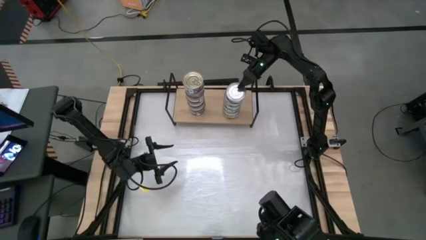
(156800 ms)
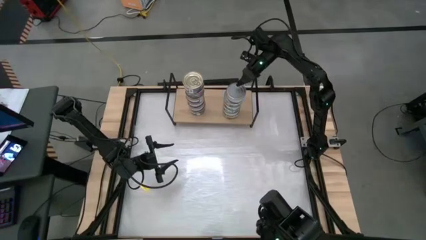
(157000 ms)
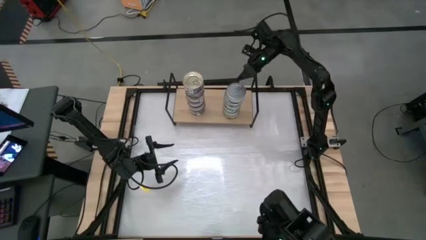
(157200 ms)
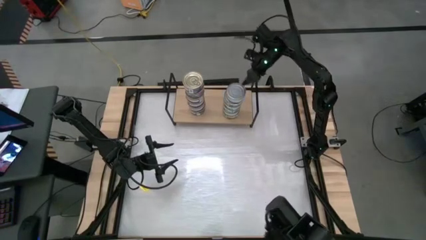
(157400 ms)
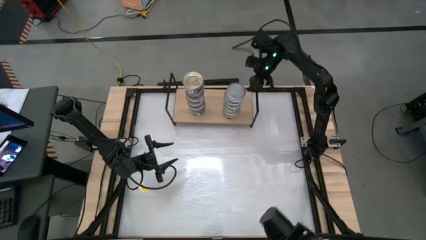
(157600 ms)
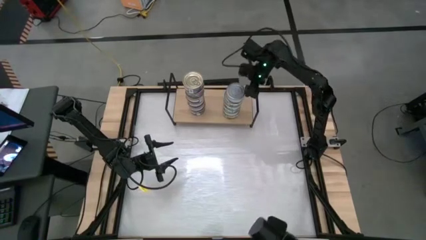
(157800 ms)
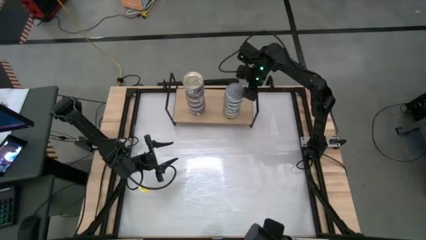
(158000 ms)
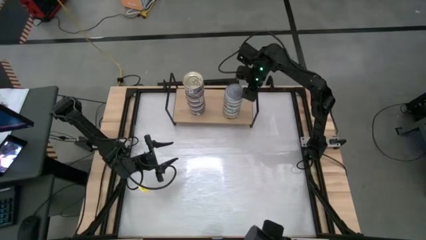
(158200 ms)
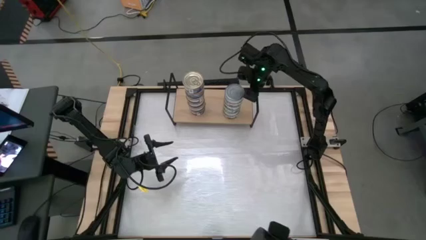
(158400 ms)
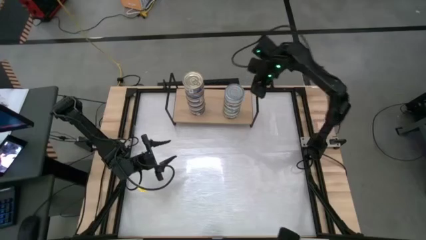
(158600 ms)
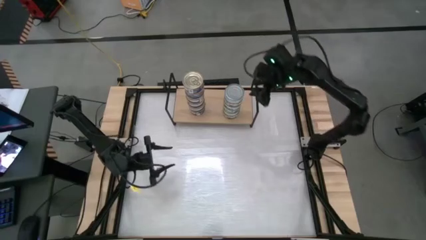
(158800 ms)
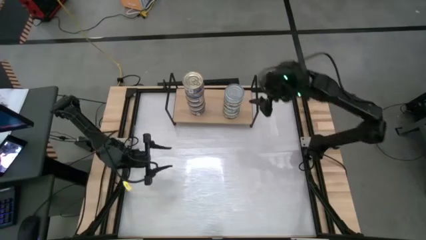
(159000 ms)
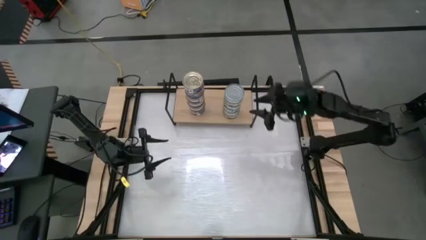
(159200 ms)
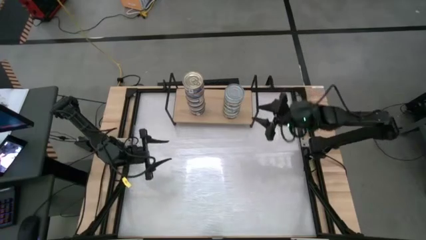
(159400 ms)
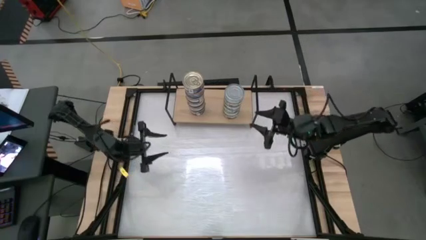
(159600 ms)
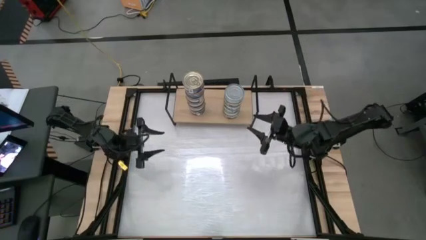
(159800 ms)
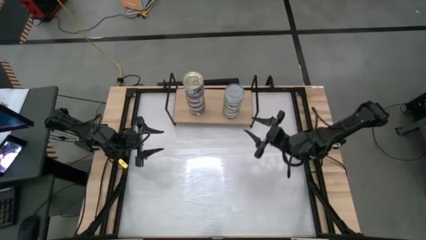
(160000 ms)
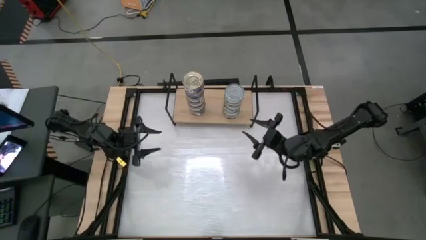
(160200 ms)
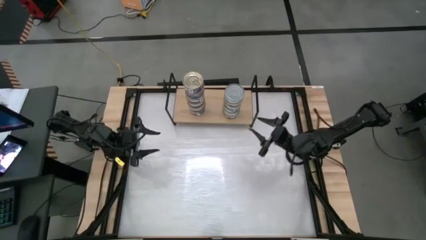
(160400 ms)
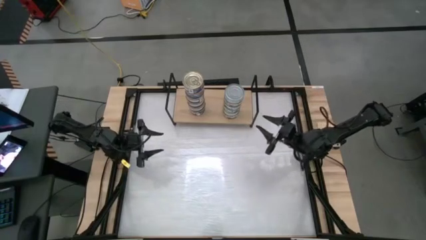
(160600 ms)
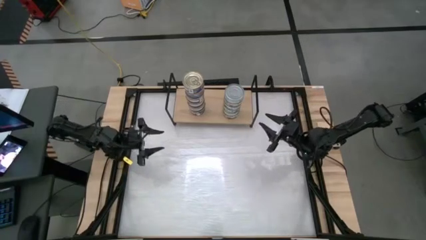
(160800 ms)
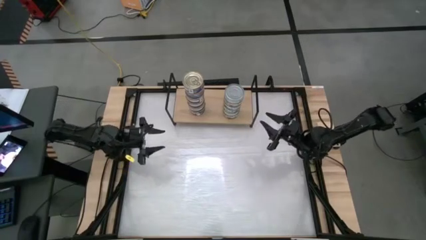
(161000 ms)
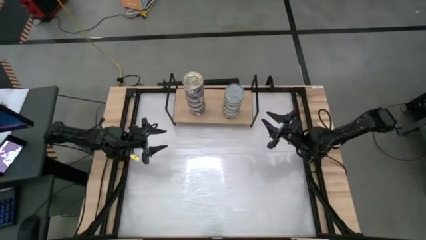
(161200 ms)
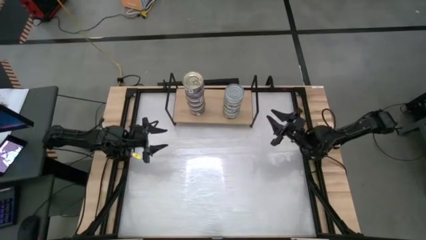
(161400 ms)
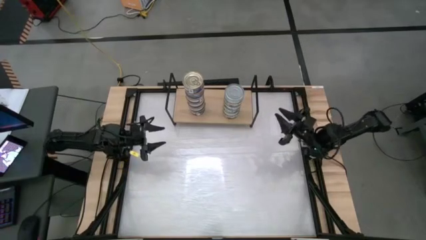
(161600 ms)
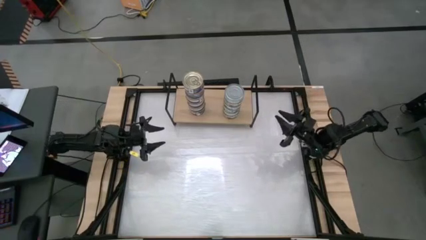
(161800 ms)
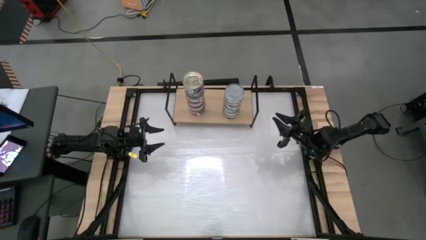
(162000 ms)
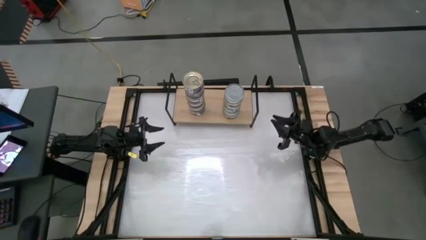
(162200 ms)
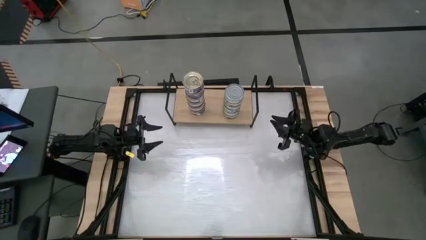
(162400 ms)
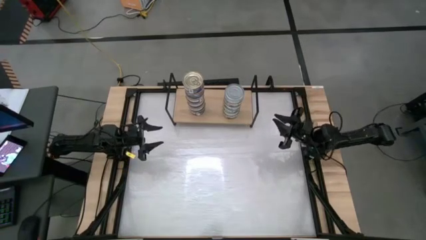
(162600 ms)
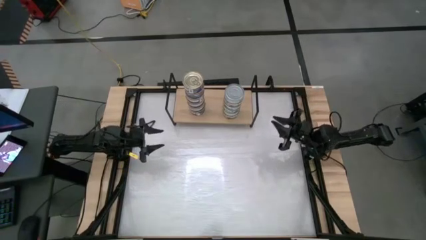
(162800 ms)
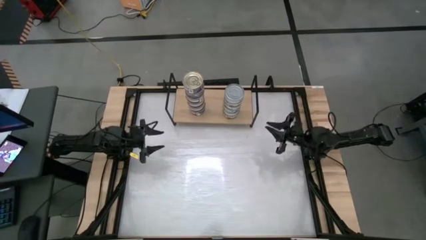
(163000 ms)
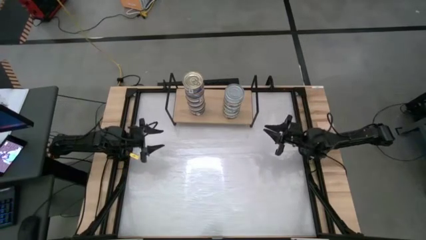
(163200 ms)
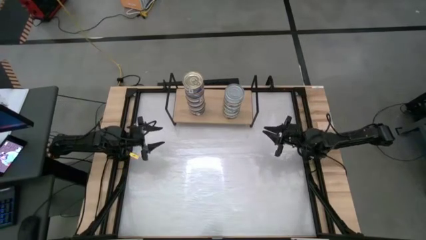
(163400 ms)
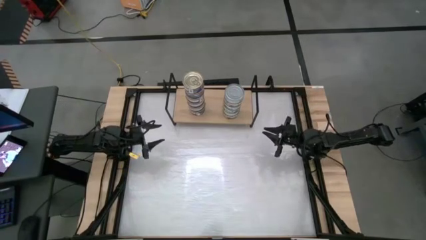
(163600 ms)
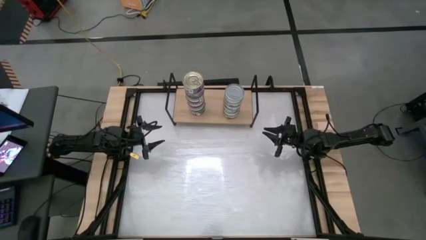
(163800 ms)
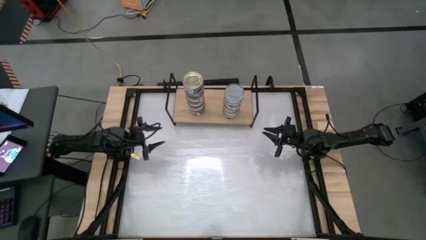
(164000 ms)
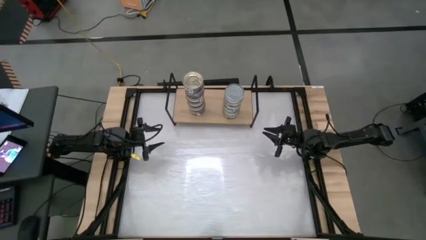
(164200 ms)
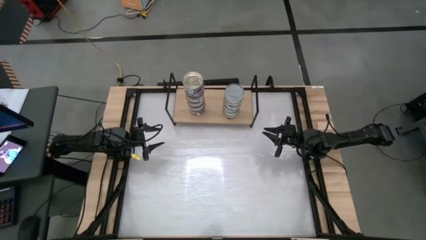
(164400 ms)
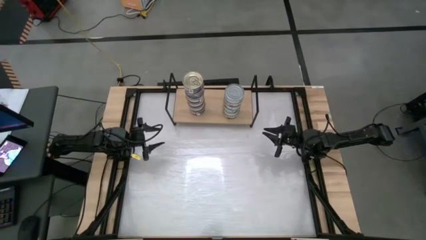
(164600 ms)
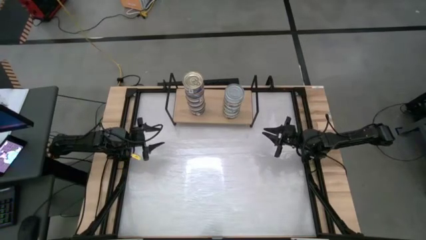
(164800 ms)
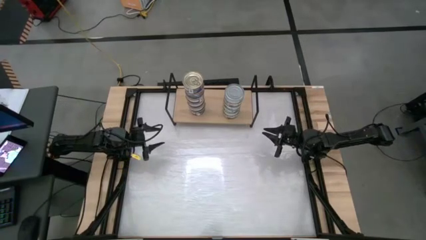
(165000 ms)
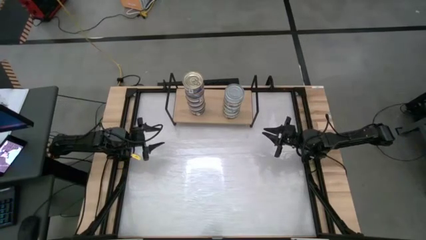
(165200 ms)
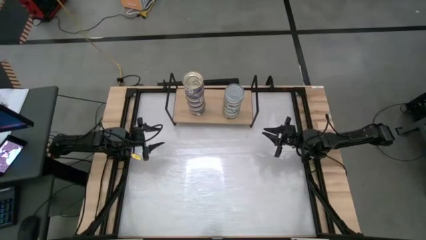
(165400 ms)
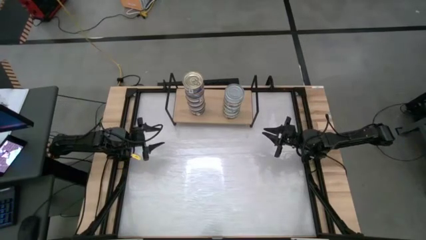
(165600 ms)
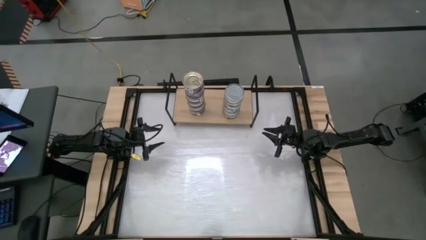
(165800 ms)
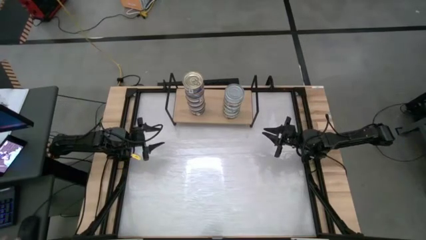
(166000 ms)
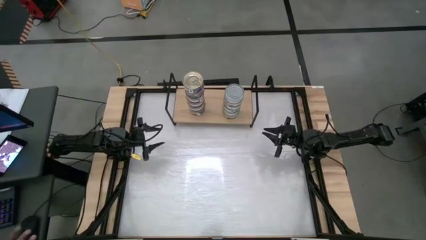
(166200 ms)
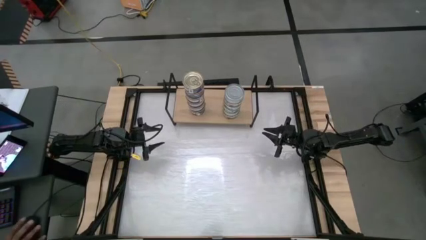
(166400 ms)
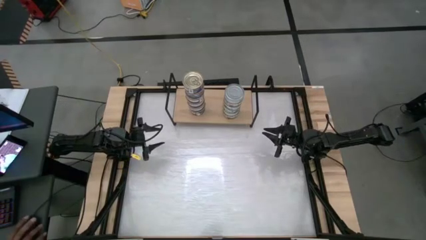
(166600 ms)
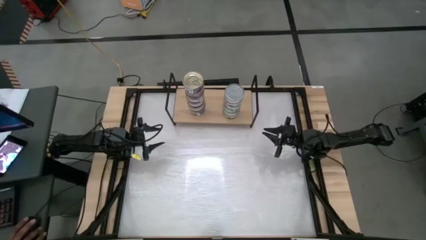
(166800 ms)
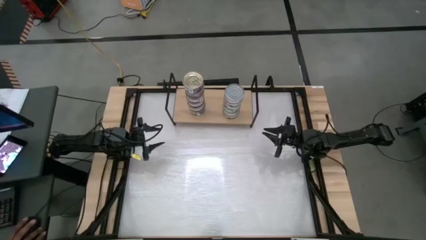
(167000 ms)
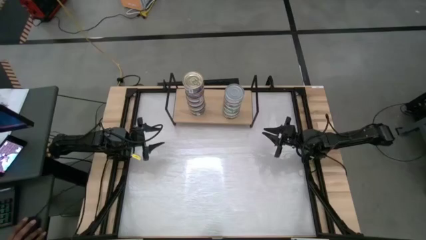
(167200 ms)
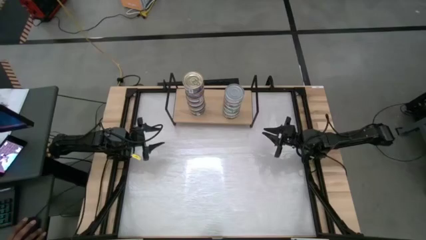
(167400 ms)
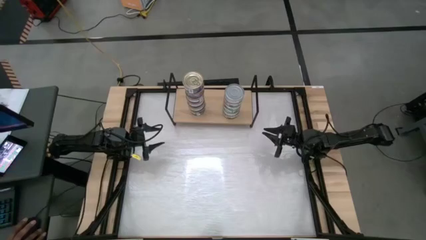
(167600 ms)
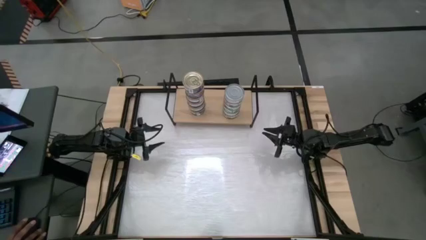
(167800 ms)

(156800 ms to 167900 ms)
Task: Stack canned seafood by type on shelf
Return to Home Position

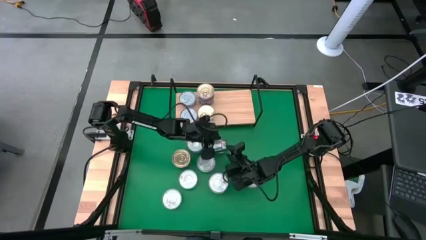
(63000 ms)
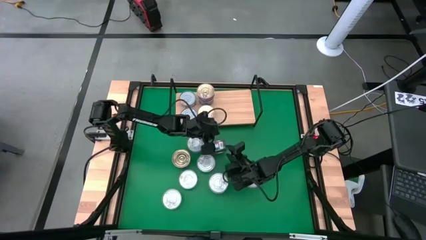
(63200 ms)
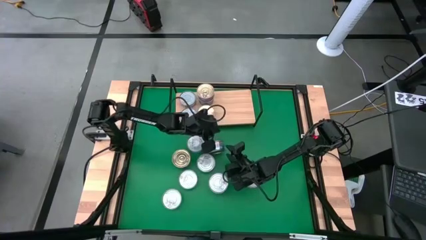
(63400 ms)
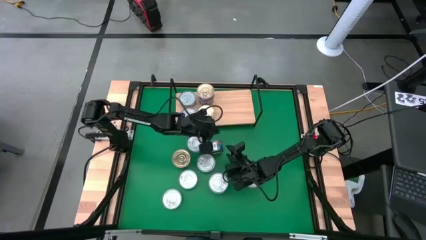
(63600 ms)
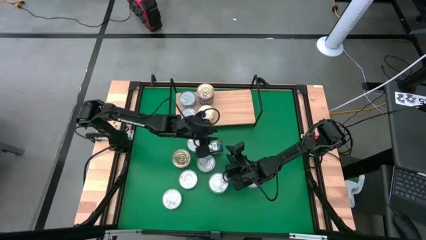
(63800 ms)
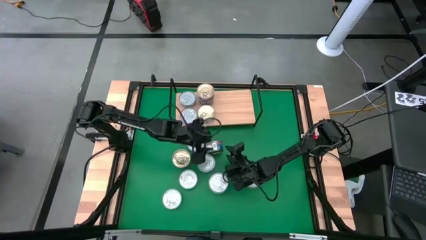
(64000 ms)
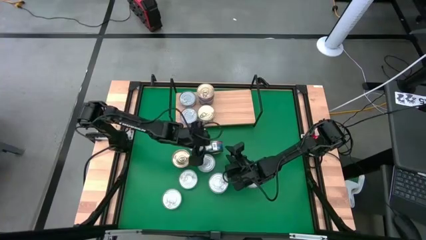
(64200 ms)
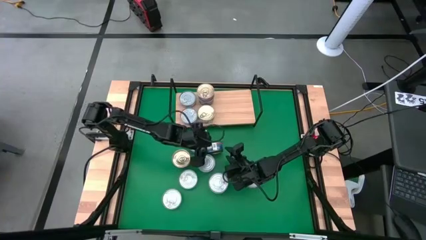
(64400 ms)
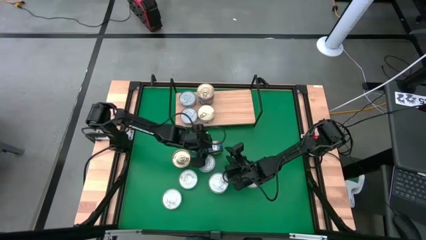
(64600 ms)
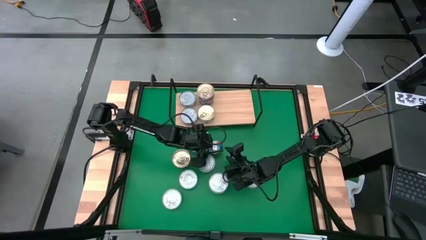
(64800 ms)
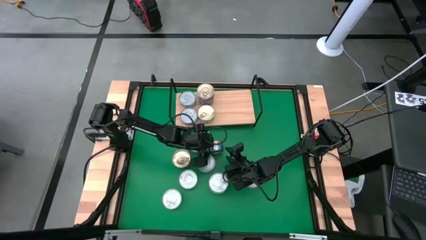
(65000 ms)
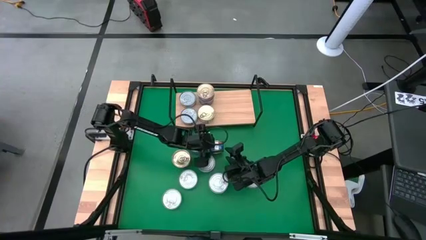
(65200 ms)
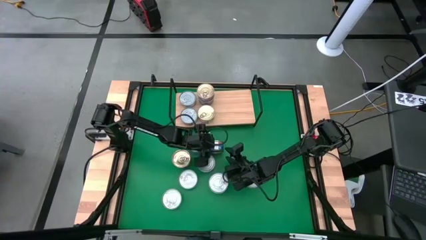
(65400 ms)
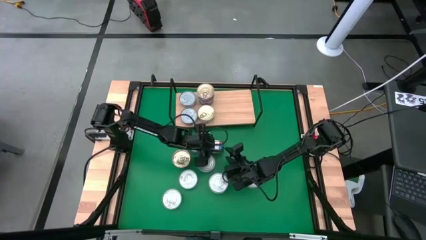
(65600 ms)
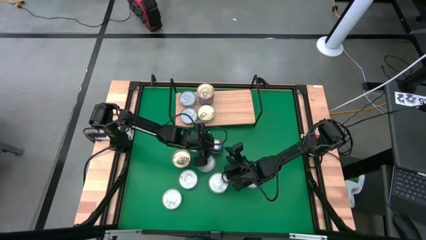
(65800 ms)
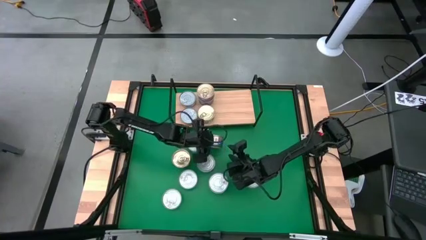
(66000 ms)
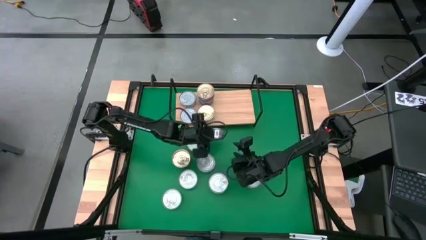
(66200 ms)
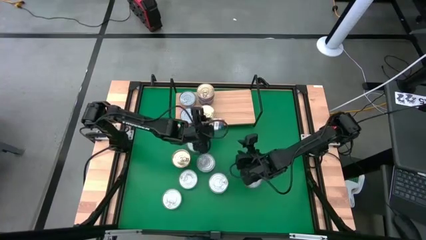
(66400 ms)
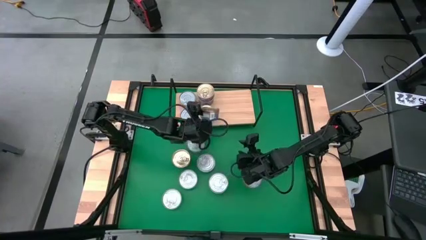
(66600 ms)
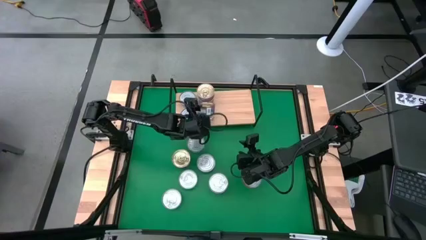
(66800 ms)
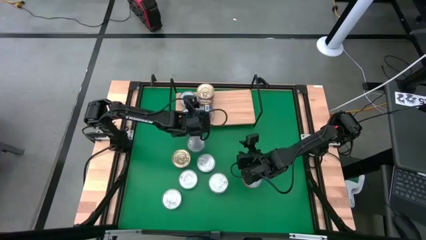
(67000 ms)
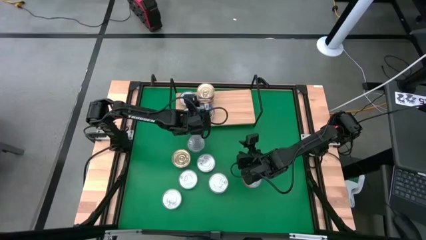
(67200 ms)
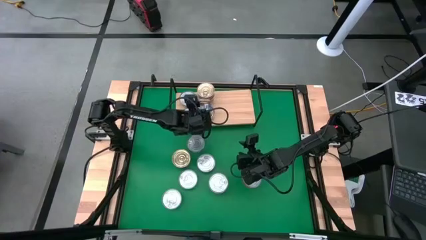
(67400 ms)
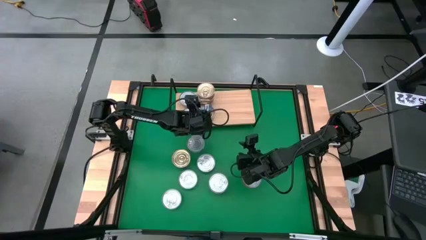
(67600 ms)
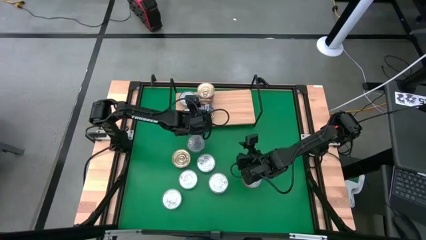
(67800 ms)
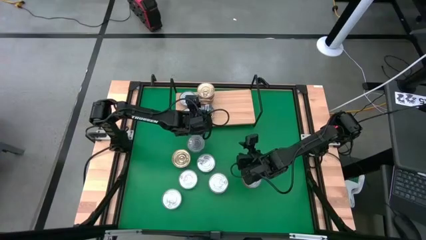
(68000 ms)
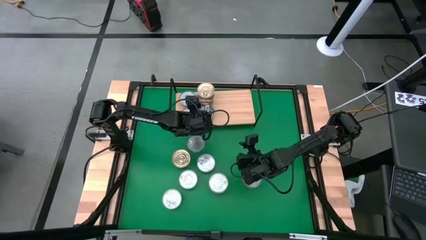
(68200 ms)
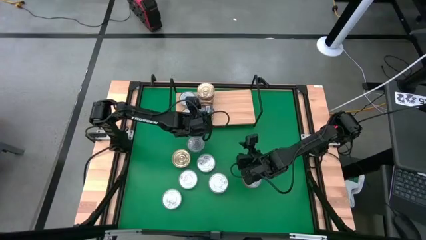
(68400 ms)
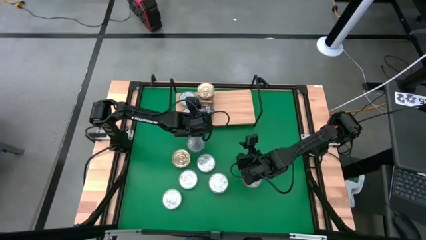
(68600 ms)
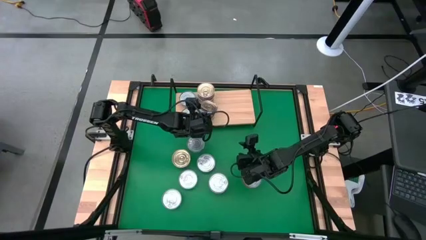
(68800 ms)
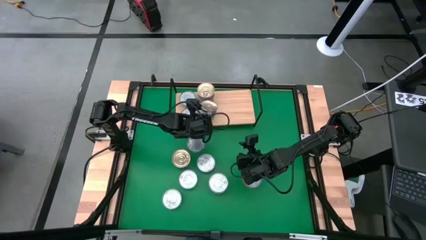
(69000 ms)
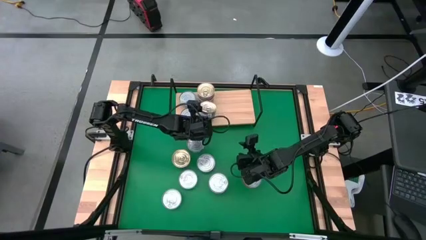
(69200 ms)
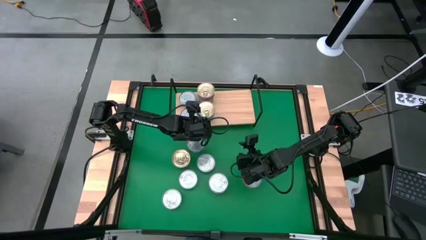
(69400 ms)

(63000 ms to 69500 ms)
Task: Stack canned seafood by type on shelf
Stack the blue-pink tuna can on top of the blue-pink tuna can on the shelf
